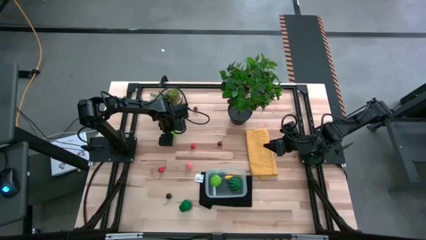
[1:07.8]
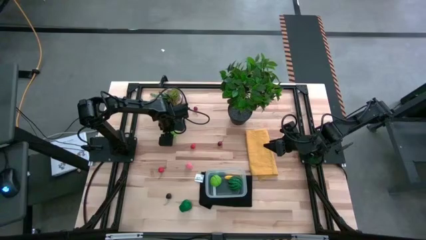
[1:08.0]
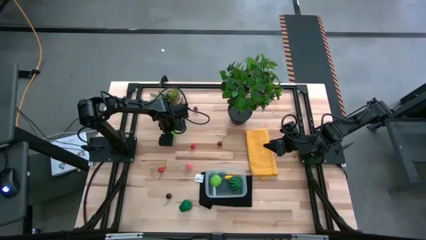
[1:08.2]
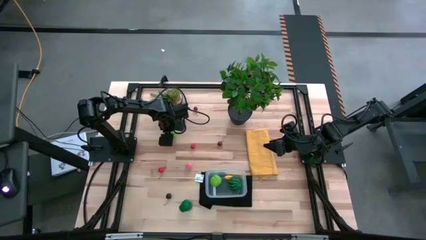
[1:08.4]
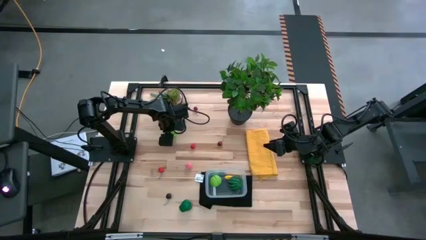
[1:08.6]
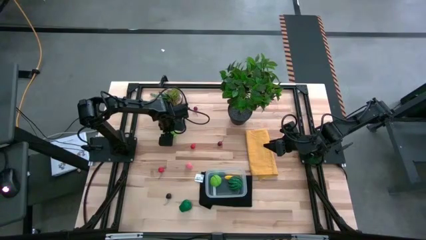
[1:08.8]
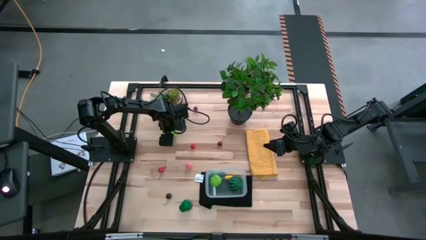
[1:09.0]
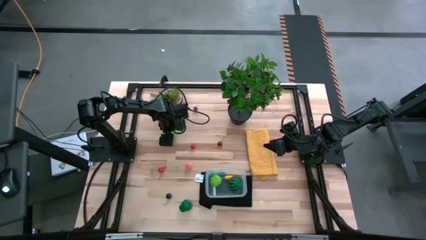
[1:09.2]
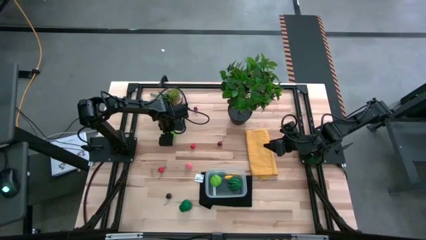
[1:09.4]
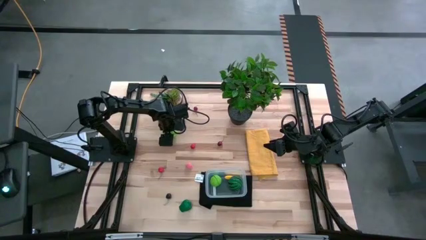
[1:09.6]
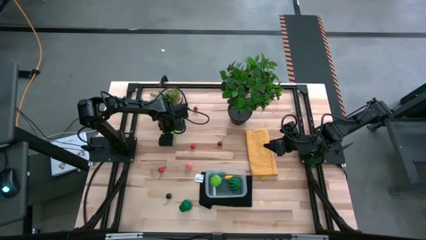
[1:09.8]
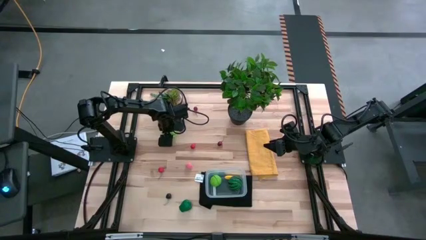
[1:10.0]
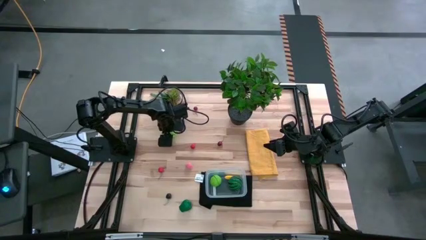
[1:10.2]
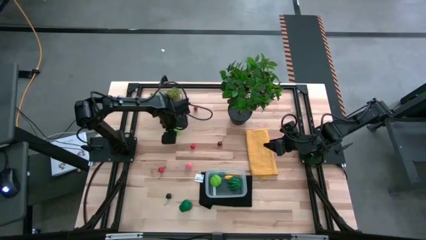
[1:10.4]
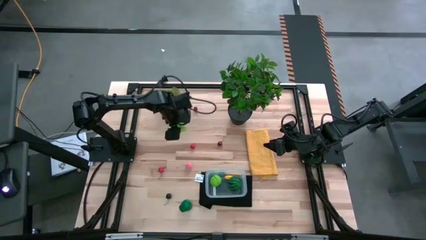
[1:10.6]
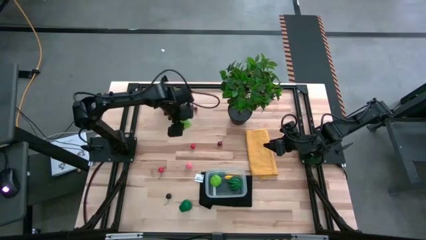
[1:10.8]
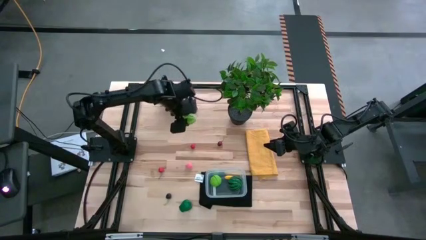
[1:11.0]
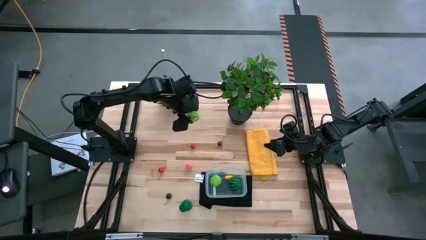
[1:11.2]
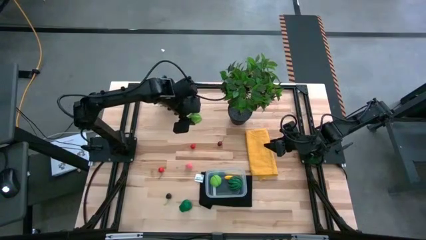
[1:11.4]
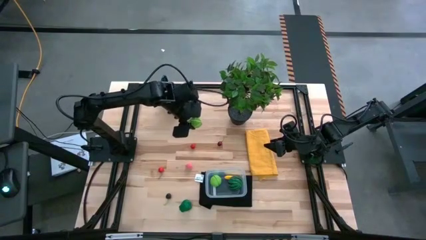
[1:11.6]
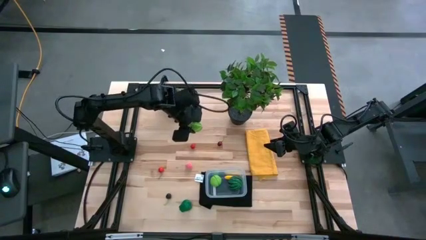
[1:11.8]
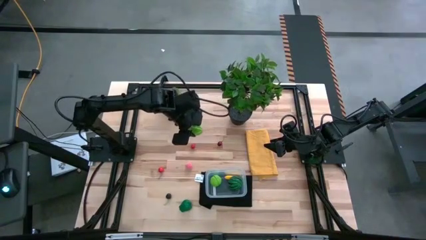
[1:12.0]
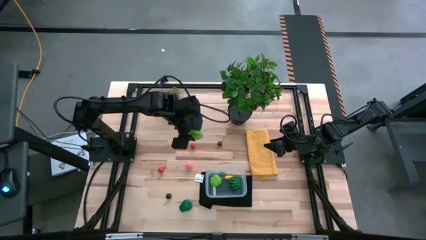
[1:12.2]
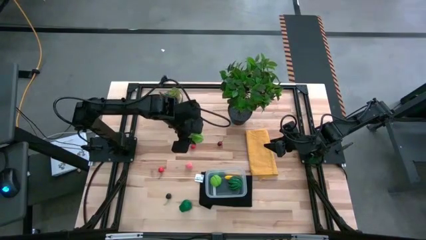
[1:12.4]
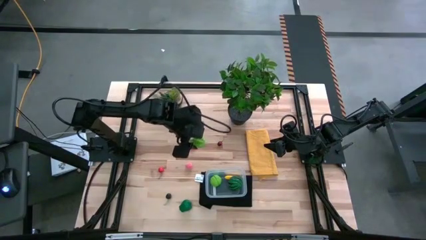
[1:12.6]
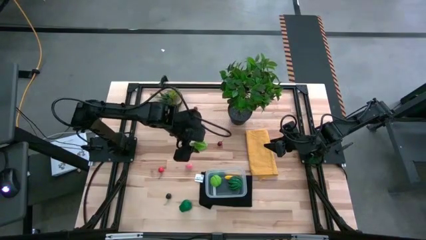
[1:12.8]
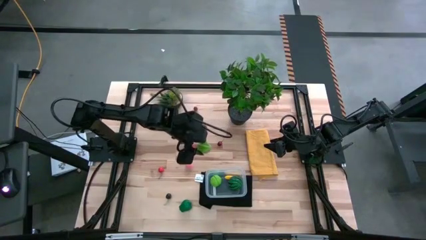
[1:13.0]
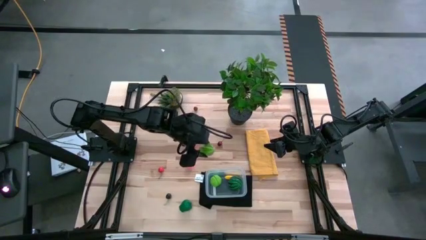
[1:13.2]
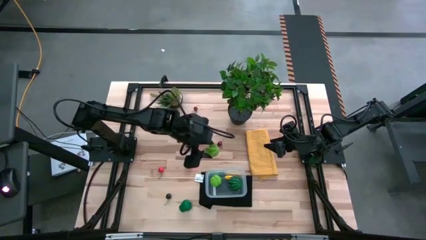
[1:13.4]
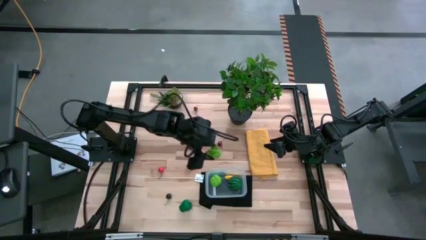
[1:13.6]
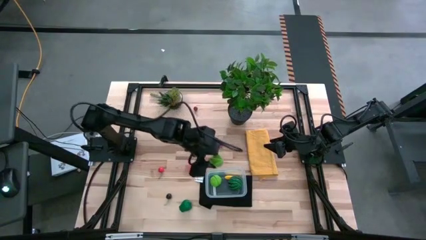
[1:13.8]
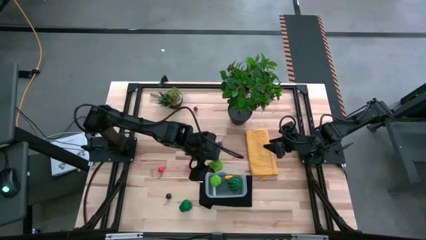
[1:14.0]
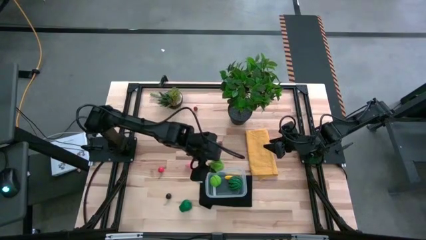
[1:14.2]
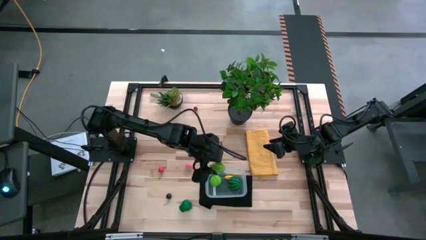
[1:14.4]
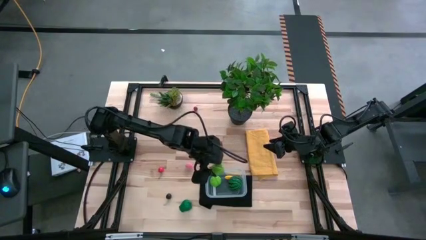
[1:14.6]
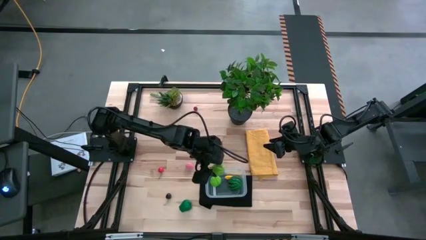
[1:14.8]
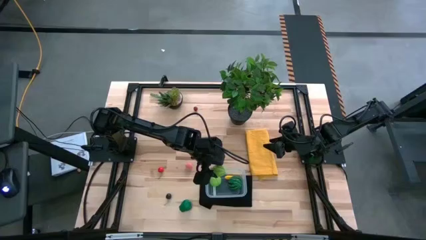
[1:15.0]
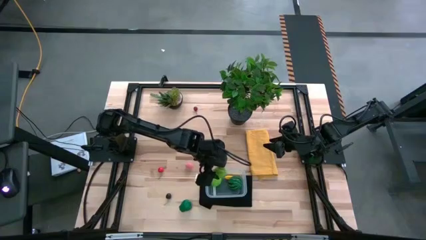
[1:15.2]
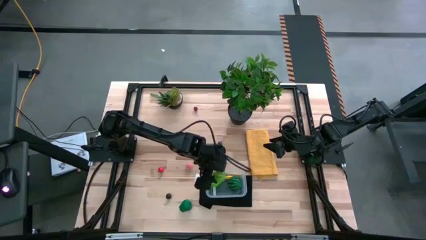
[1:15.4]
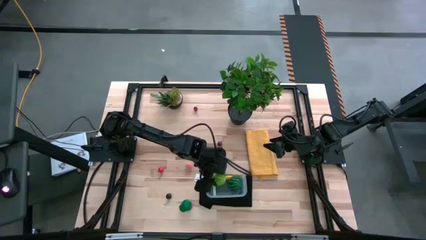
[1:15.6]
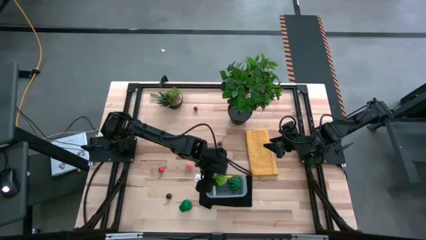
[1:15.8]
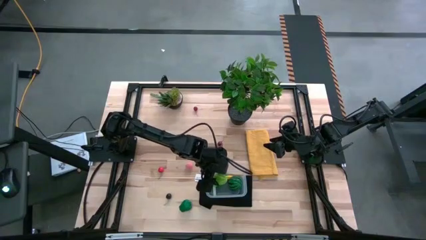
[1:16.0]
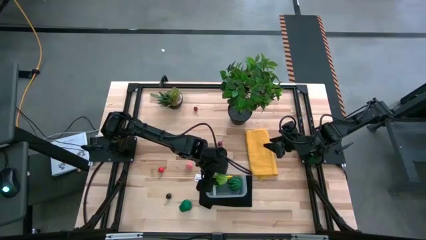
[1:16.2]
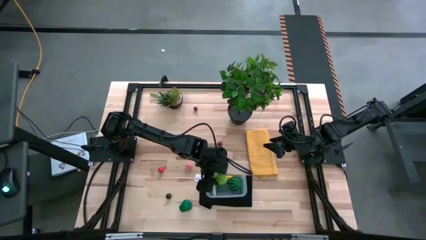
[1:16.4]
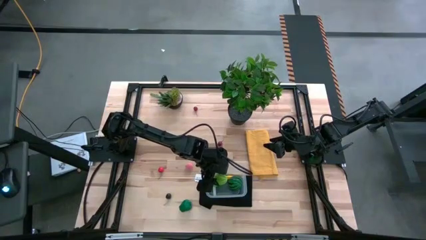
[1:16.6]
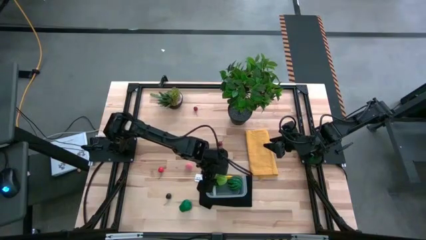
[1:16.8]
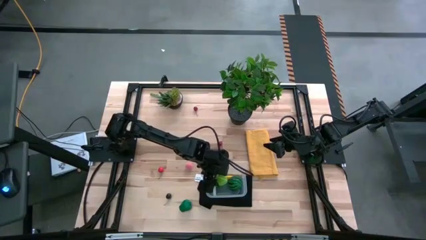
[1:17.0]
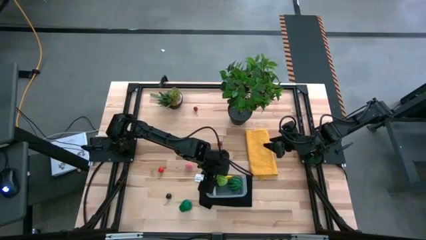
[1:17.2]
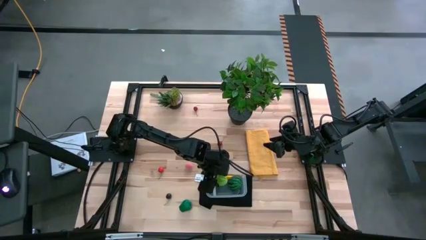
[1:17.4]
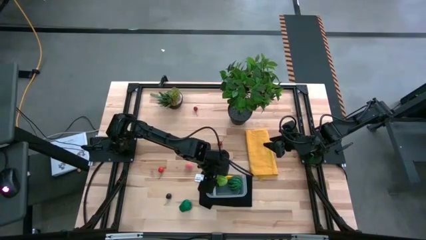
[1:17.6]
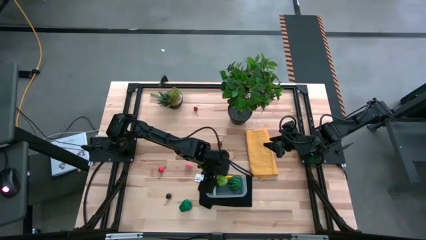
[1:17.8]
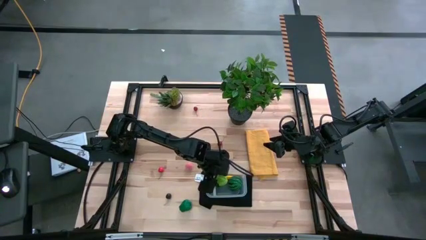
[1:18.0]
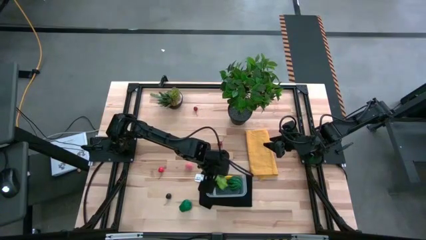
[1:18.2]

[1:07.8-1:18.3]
Task: Pick and placing Produce into tupperware
Put the star fruit into the transparent bin

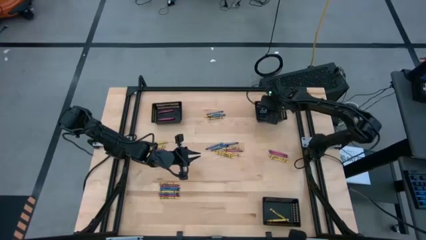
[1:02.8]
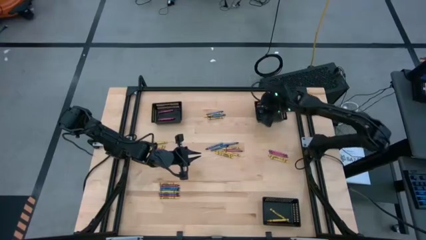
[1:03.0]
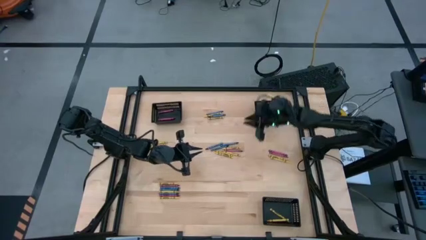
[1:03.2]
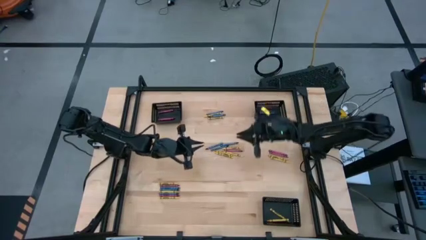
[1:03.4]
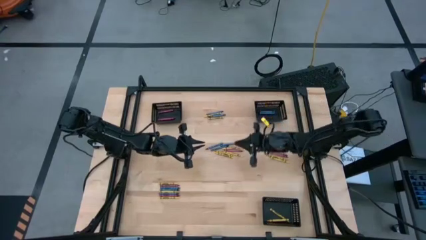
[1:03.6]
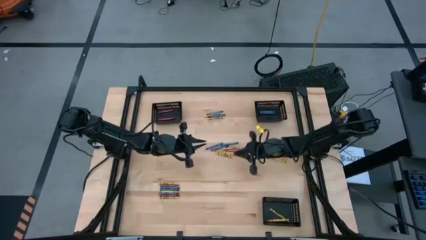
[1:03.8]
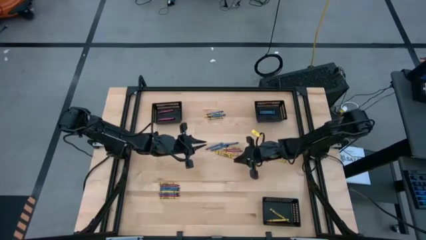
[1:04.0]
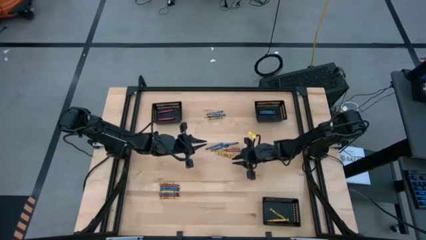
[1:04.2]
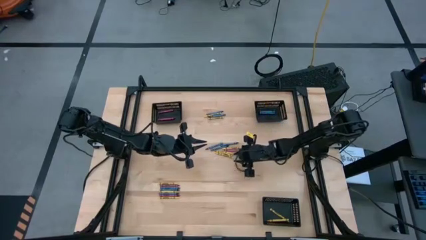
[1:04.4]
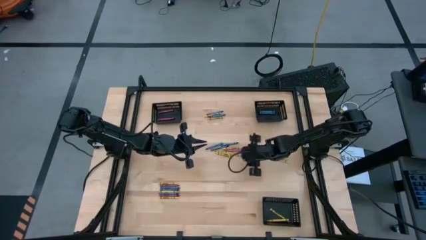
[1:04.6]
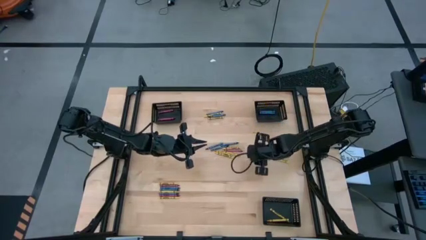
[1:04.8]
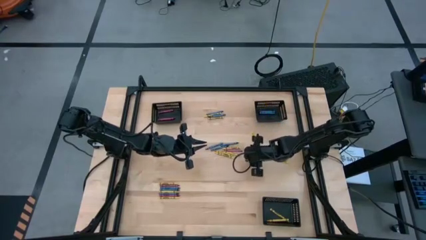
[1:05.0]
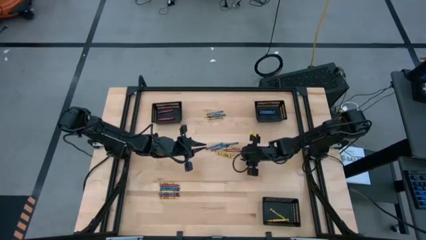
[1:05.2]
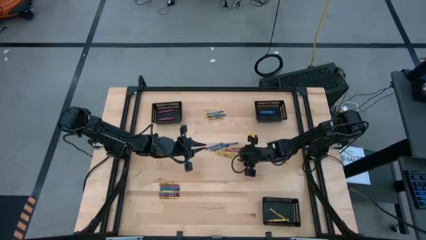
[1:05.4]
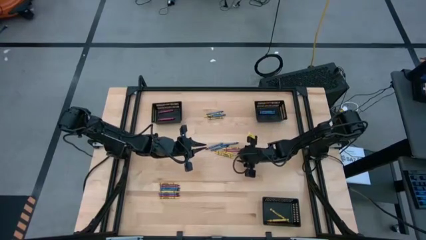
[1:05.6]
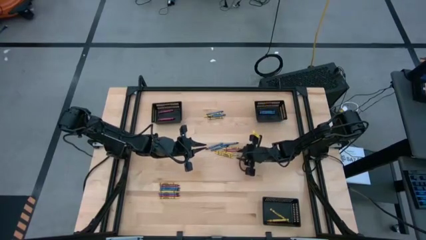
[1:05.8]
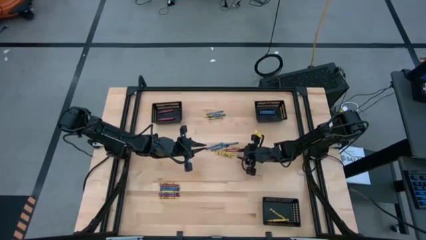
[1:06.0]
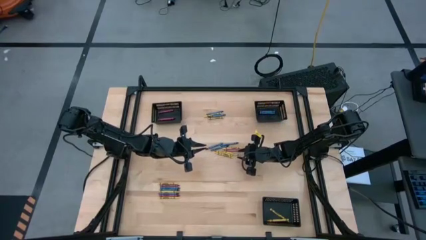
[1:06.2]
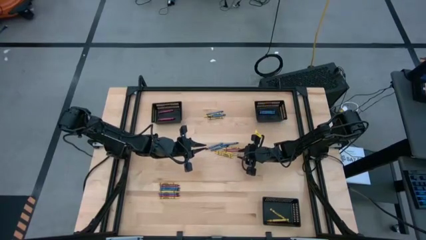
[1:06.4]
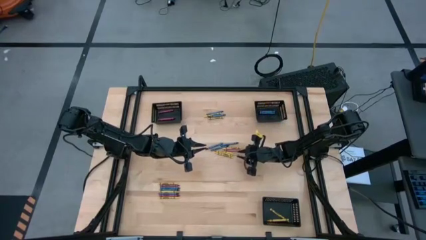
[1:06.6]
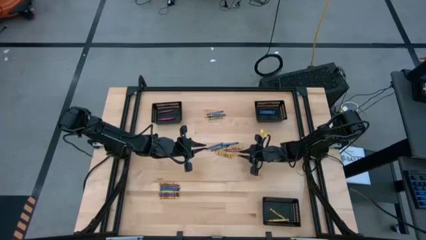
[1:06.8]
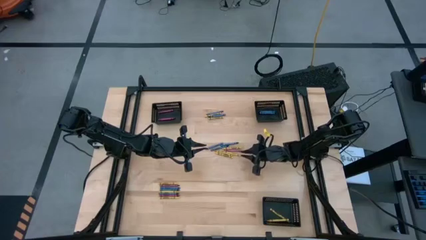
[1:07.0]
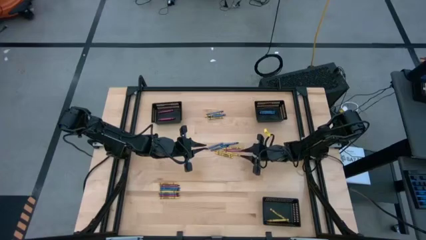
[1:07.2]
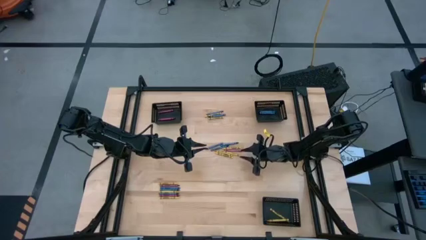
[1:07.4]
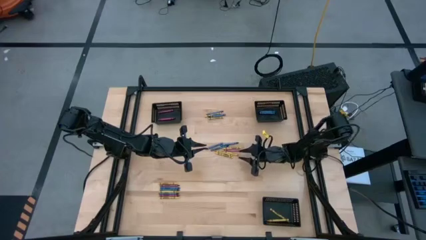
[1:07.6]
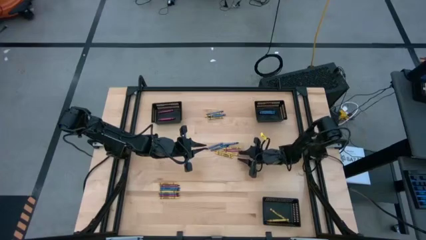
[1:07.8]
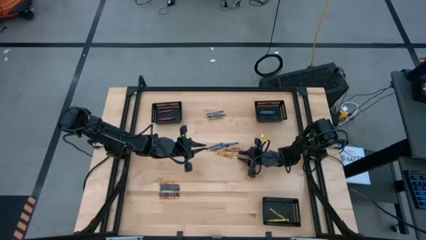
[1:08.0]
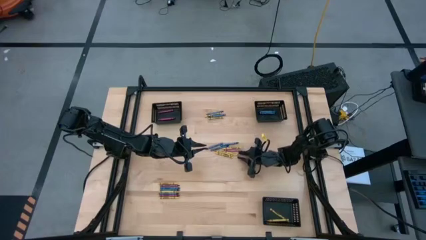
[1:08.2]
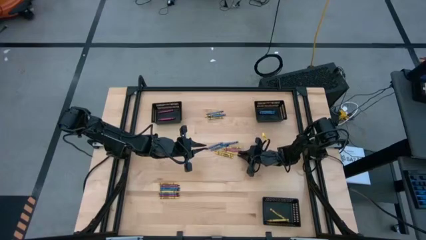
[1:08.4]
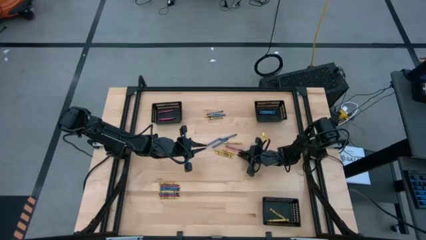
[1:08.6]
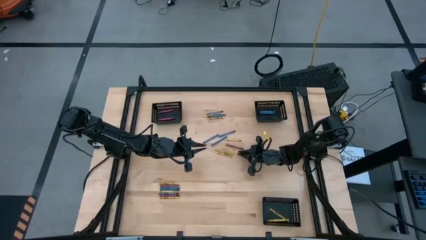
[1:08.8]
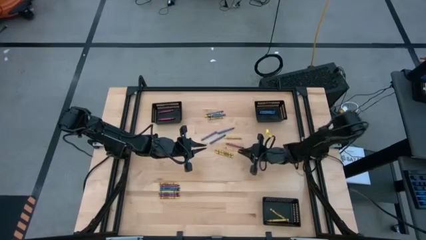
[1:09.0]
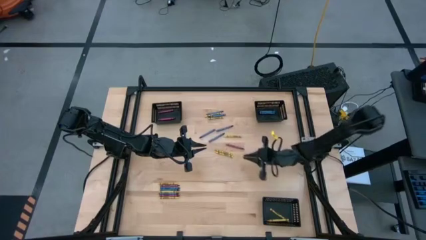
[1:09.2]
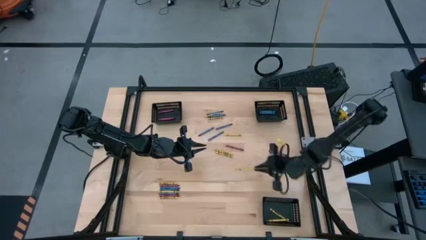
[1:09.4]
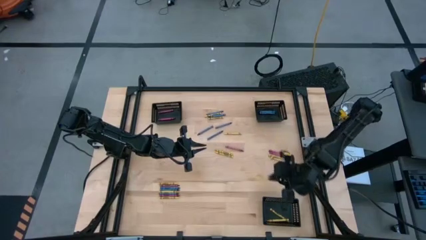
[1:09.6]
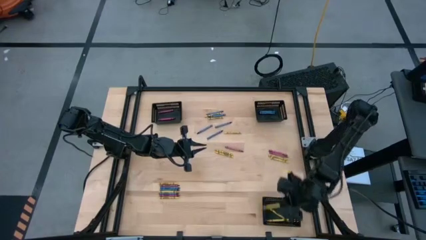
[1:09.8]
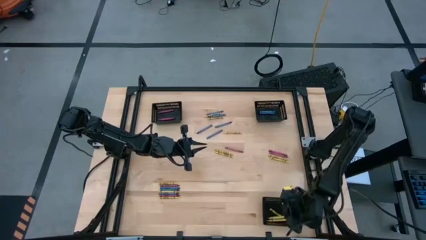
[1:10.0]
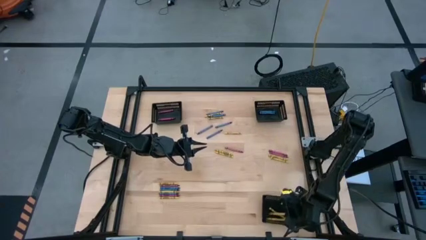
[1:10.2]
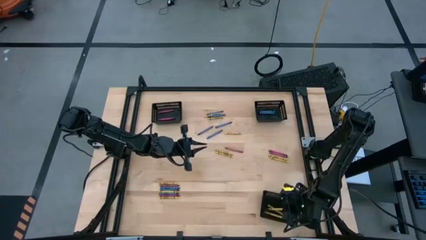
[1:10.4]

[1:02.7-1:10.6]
Task: Sort crayons
Put the yellow crayon into the bottom black bin
